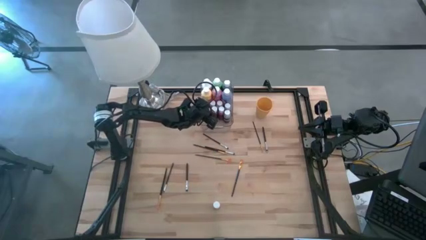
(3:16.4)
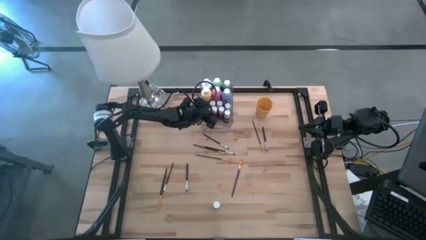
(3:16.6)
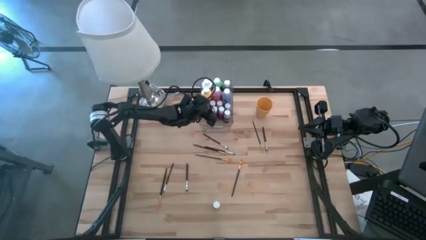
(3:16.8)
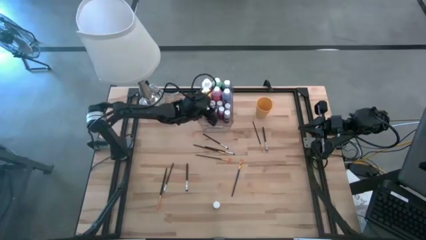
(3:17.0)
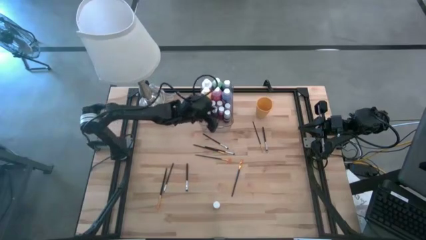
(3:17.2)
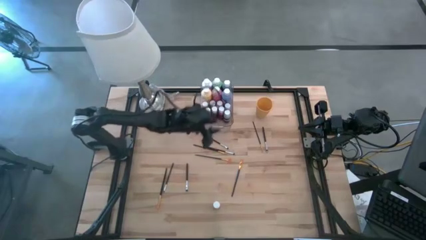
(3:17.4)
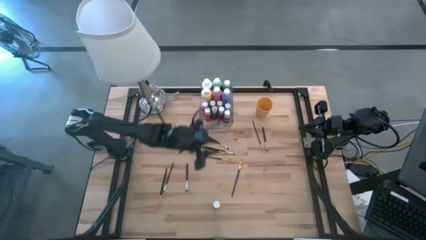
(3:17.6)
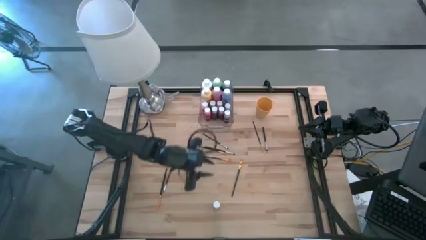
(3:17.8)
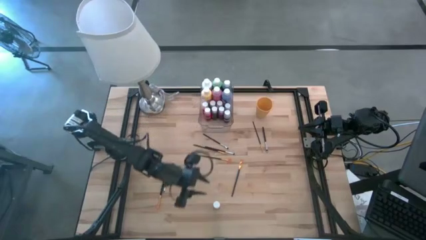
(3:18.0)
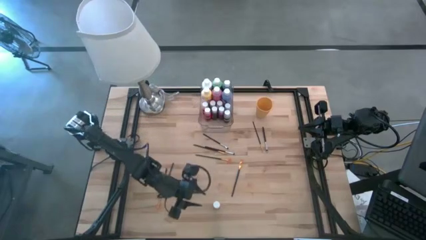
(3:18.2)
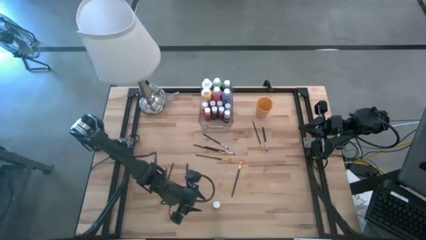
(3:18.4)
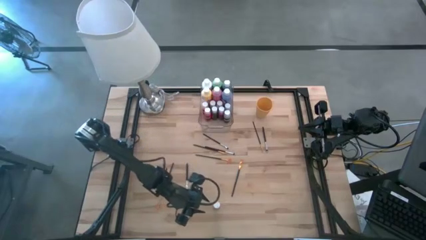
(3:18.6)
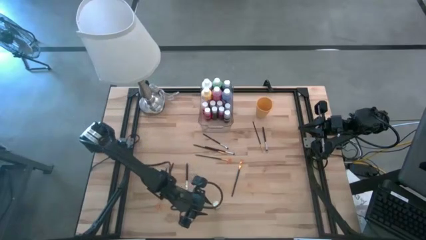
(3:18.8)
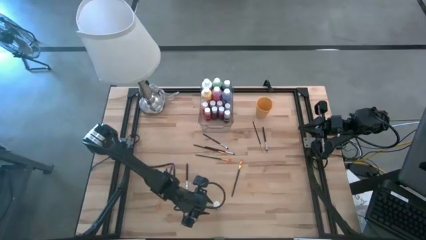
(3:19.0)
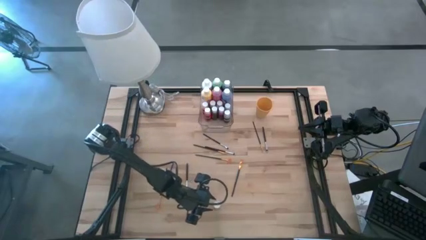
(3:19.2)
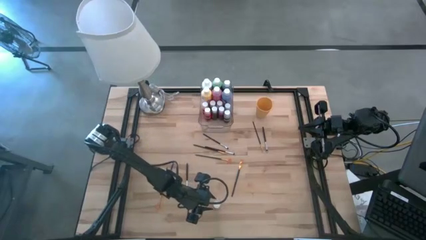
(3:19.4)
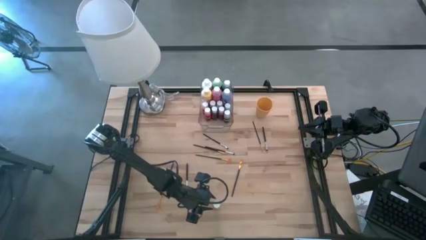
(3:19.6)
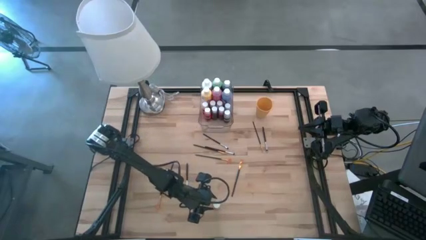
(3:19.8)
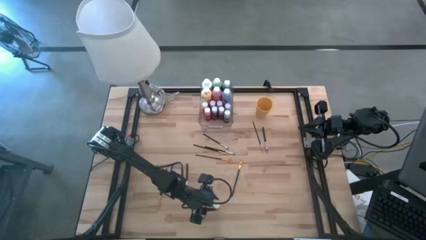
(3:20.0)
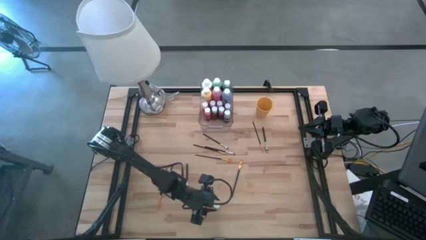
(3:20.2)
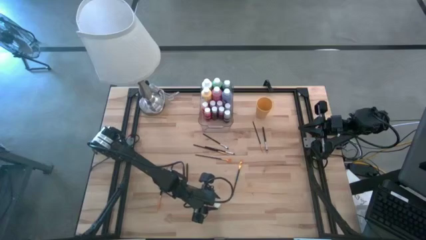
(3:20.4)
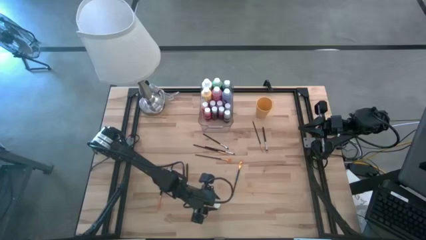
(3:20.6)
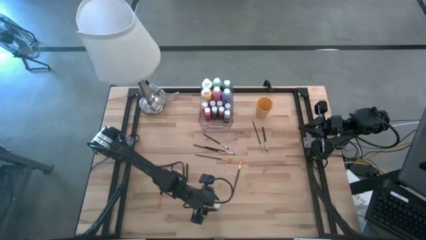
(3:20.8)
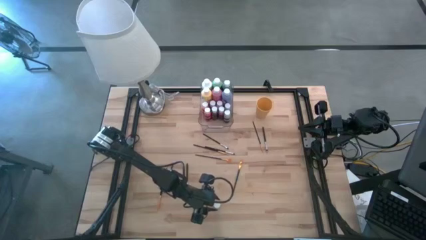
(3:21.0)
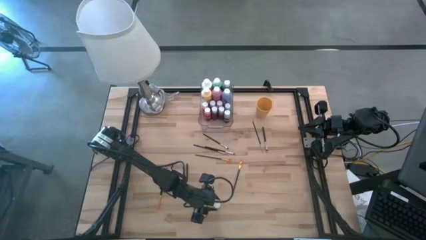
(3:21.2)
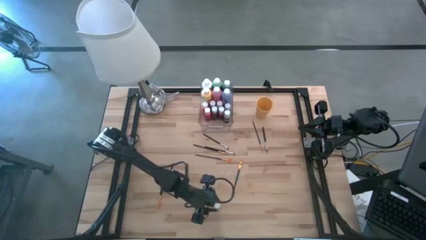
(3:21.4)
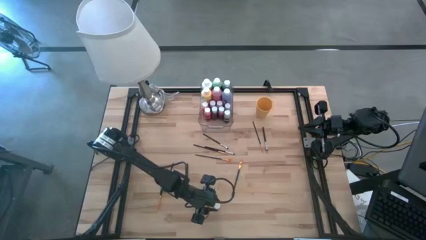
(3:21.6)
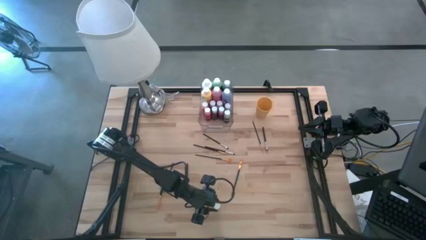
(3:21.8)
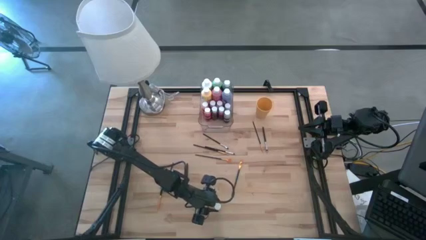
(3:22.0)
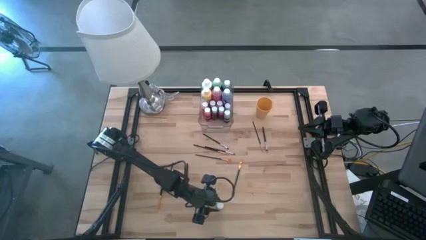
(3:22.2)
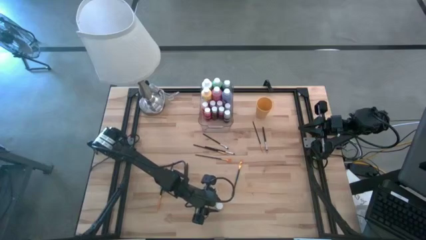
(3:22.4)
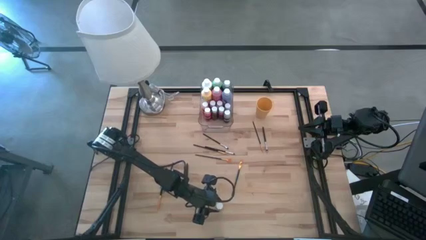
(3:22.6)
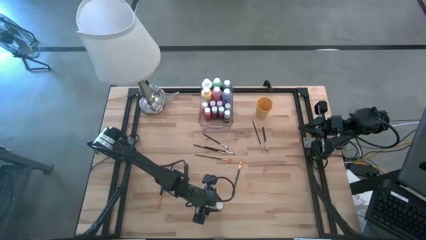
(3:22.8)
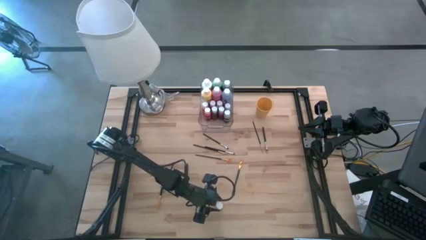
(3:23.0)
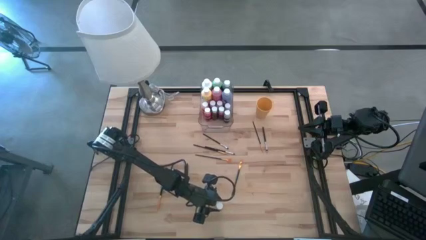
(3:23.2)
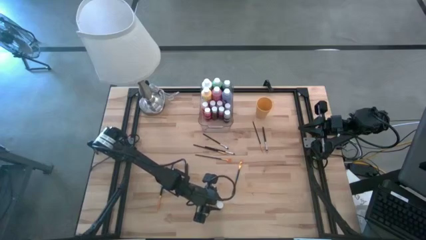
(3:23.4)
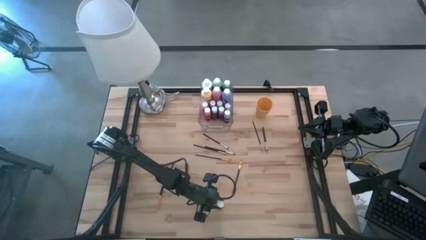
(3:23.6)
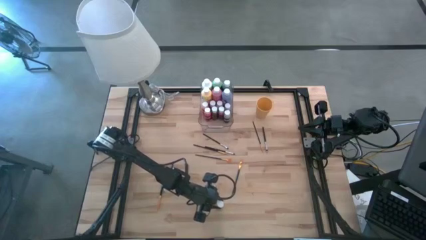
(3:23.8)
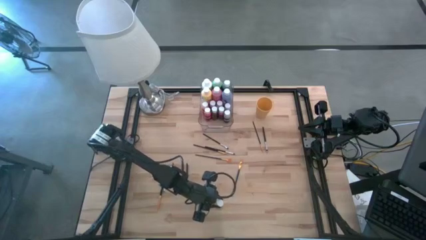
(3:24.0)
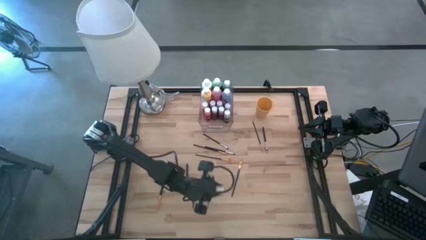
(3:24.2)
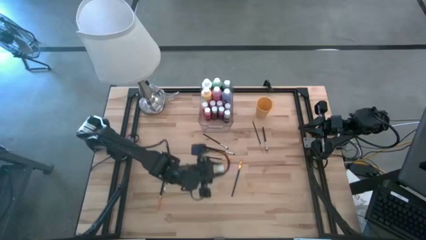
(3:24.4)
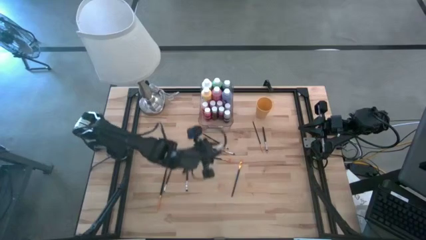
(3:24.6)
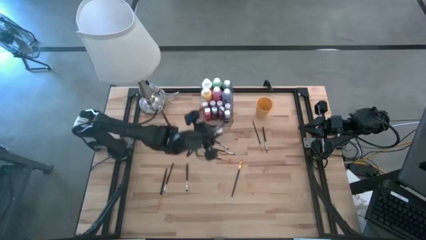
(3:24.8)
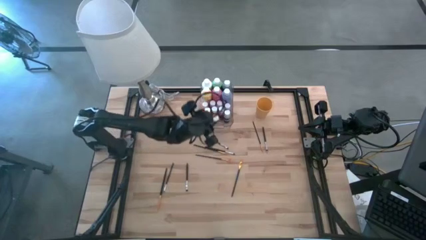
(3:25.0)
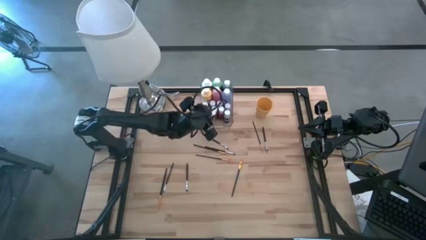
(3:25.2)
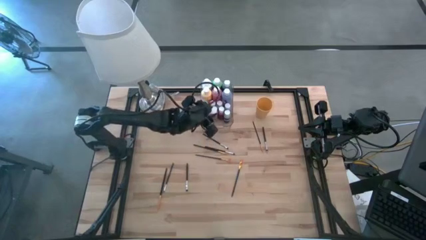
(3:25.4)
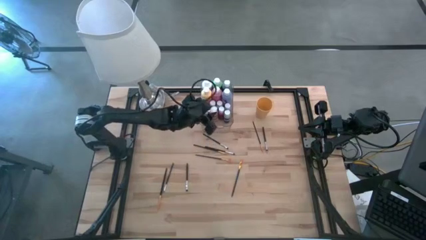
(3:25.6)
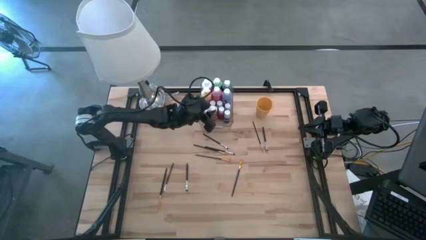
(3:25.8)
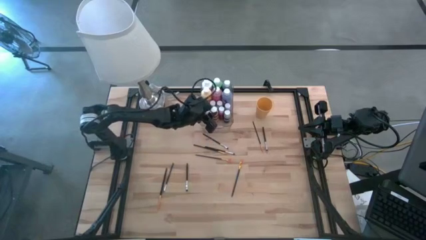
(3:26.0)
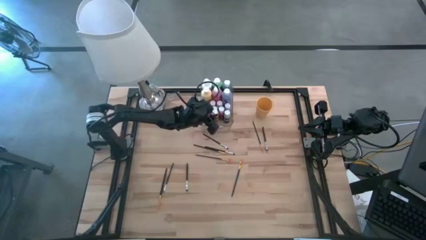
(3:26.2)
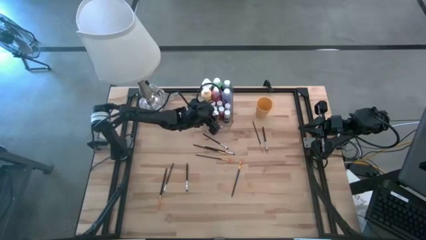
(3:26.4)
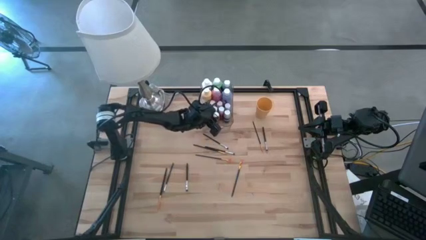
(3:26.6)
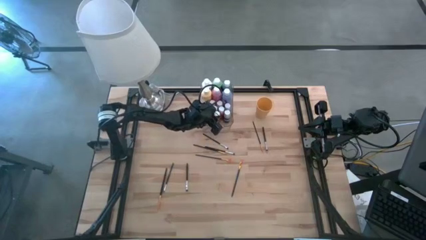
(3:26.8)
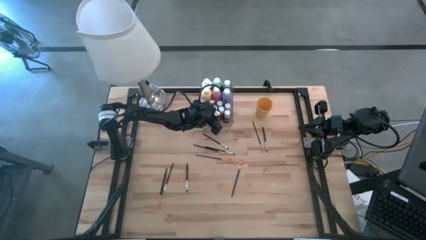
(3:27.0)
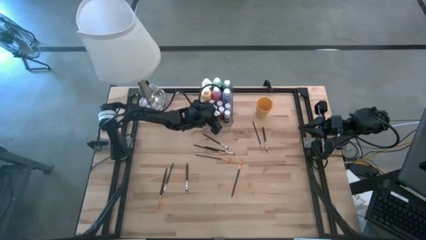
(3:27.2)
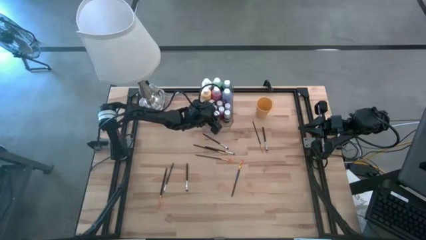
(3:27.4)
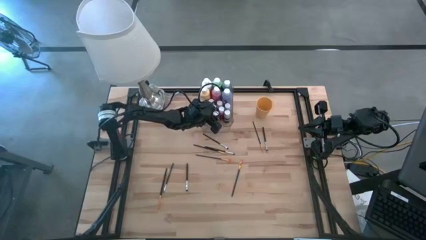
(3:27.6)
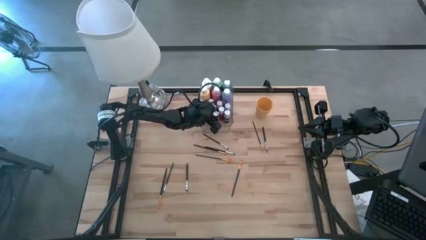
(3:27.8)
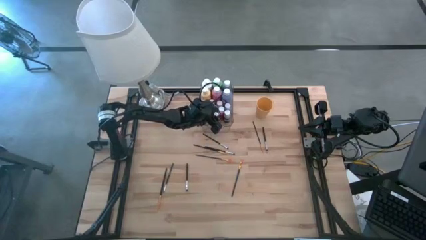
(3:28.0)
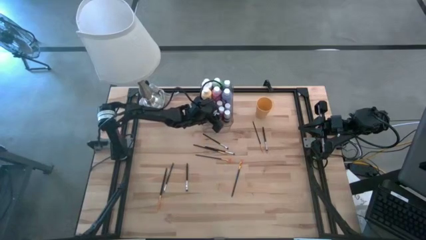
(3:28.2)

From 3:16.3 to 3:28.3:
Task: Pick & Place Paint Supplies
Put the small yellow paint bottle into the bin

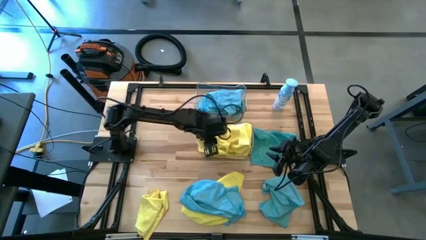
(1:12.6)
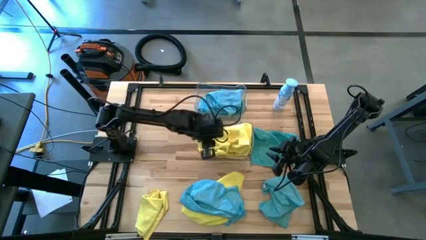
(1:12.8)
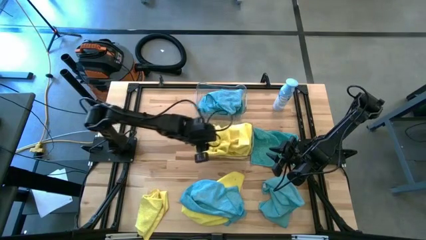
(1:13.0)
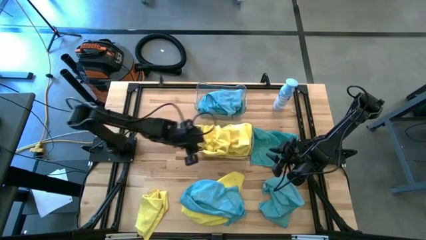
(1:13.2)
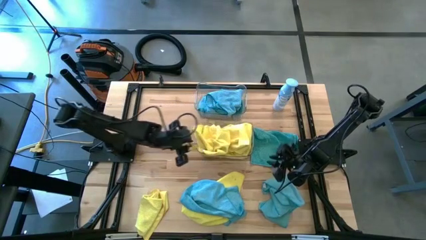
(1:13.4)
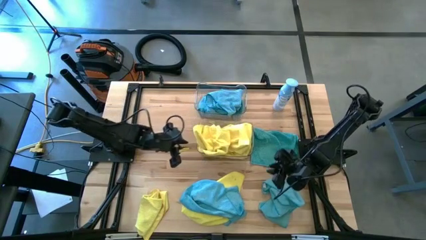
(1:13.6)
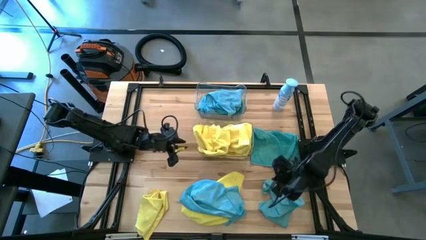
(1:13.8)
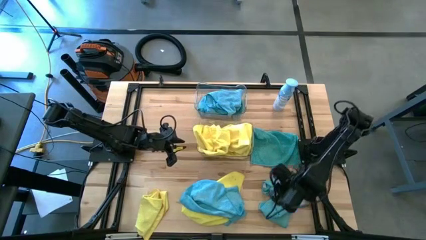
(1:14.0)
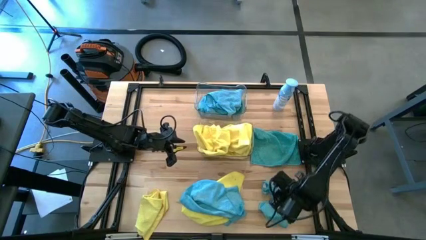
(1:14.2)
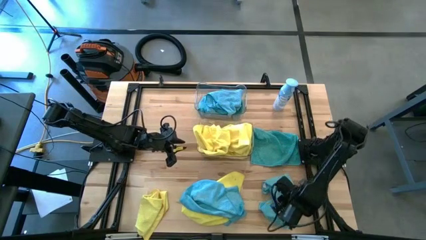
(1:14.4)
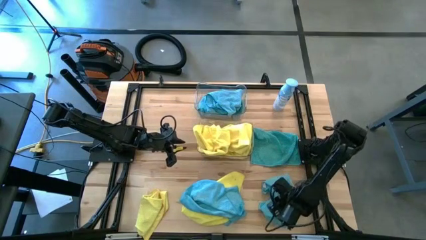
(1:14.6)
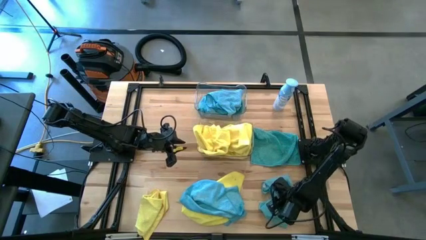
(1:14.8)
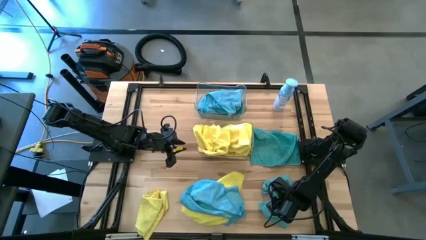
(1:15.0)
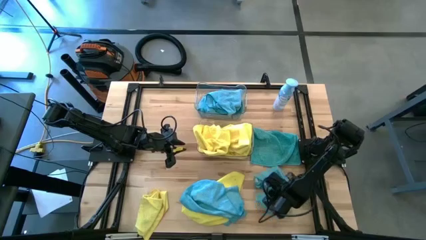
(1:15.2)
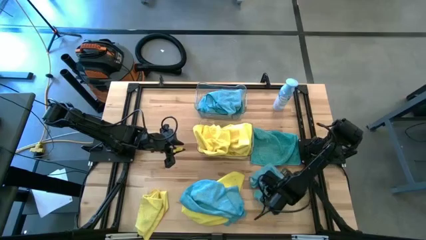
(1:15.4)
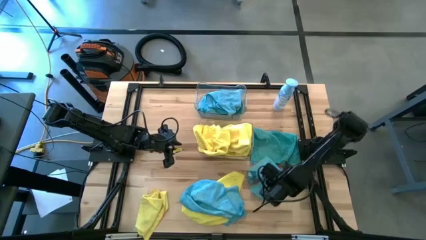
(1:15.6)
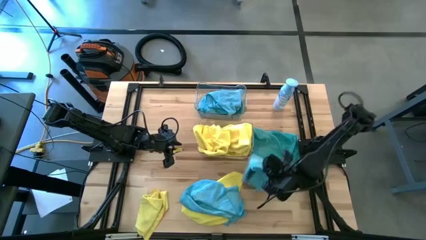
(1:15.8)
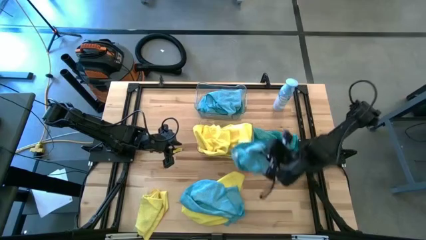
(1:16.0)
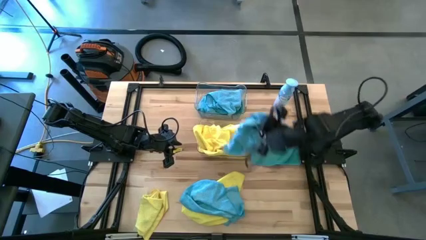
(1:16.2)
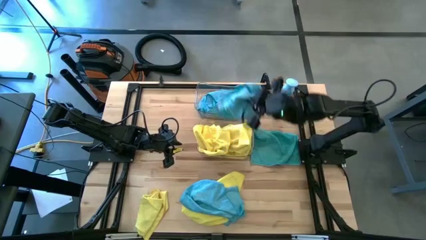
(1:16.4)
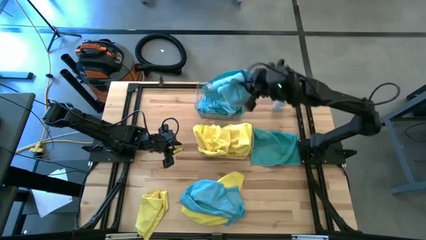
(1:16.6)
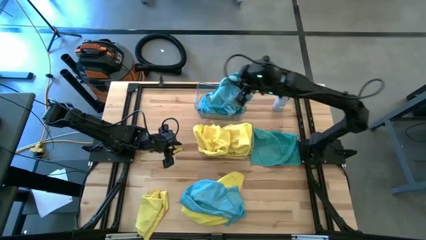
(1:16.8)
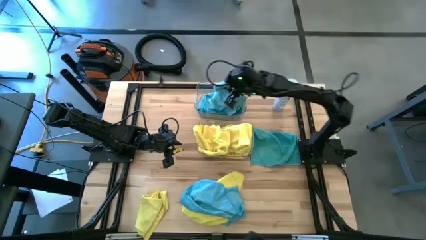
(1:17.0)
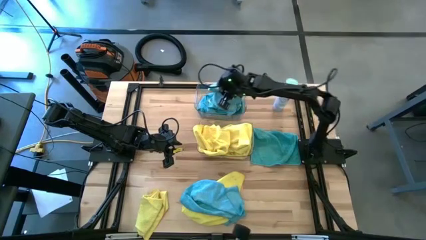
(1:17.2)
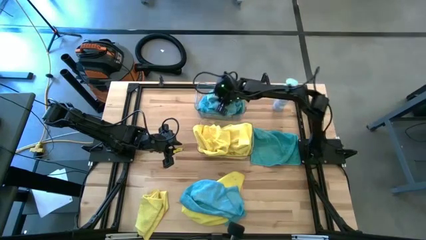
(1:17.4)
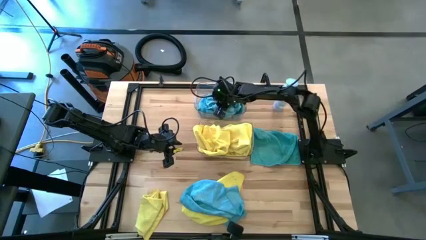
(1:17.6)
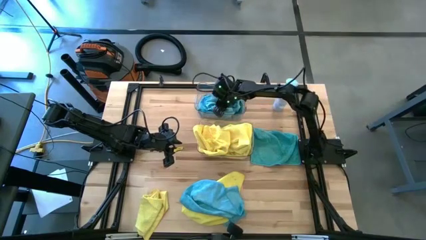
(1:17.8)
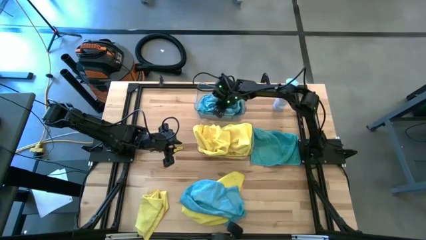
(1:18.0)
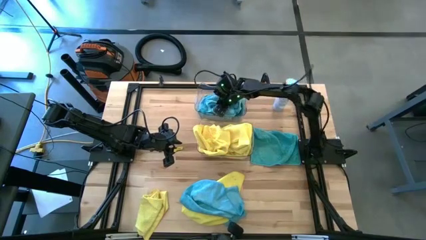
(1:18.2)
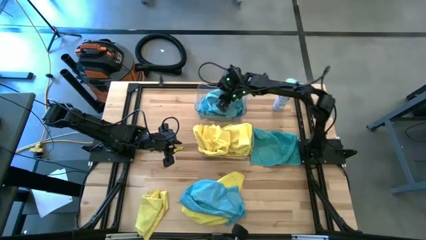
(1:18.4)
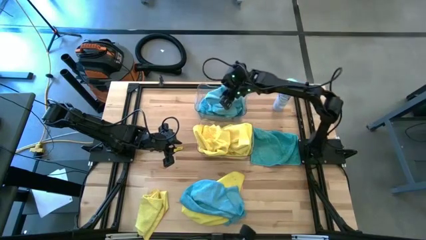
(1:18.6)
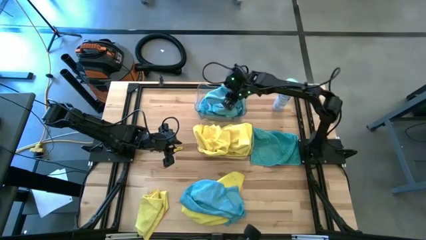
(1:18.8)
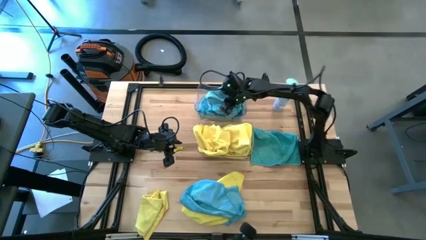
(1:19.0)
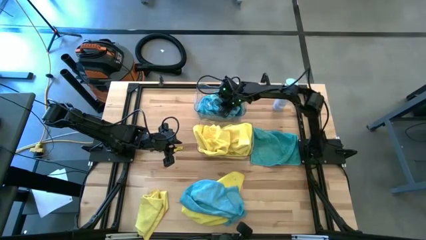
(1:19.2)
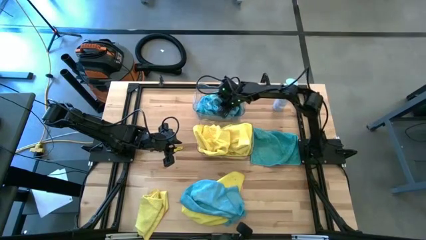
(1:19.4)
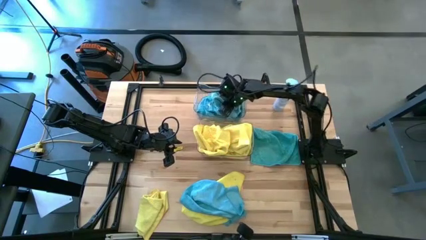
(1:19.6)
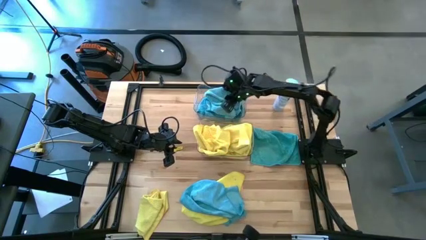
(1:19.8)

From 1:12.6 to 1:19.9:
Task: Sort microfiber towel by color & place in baskets
Put the blue towel into the top transparent bin
